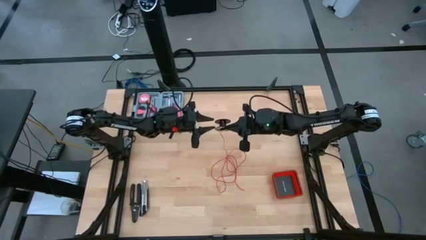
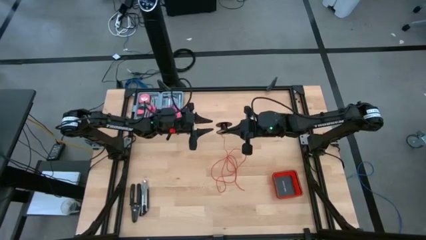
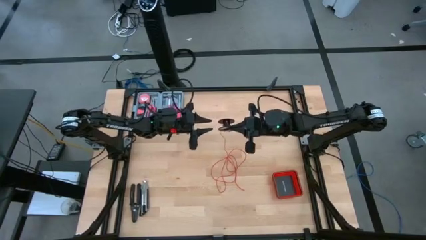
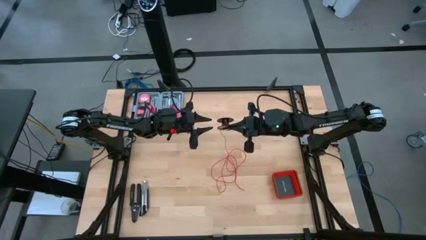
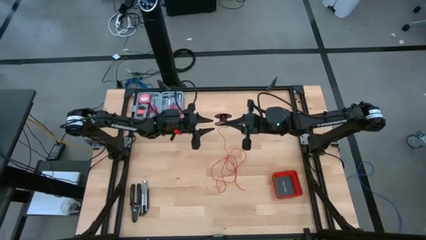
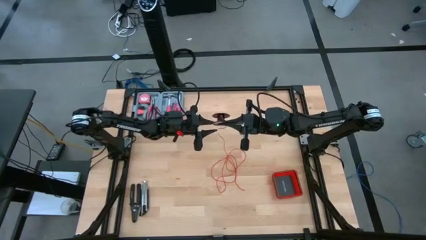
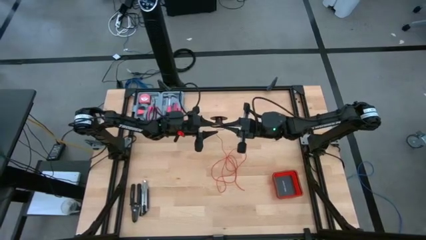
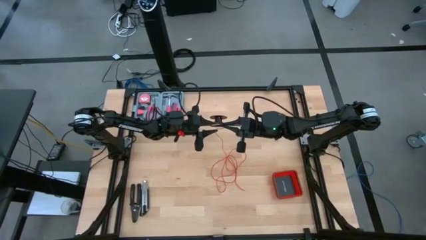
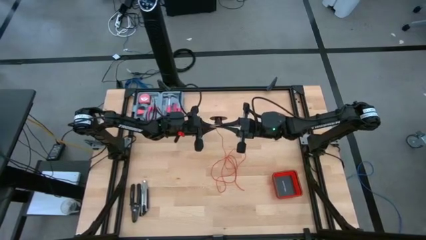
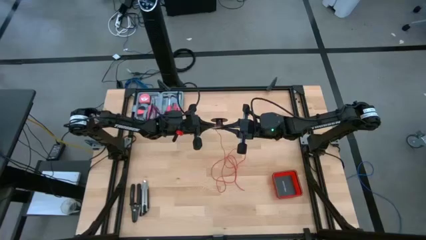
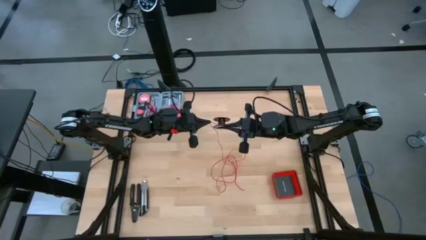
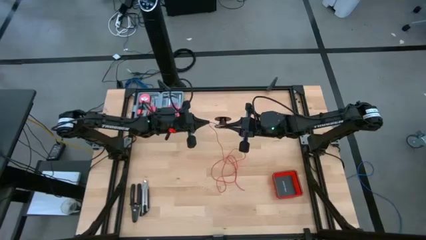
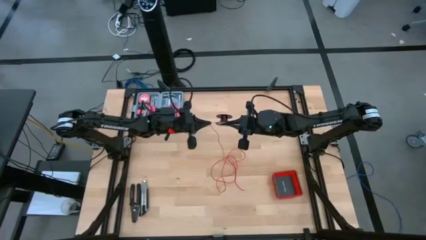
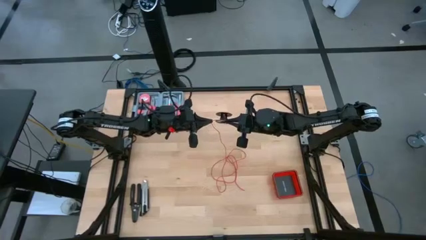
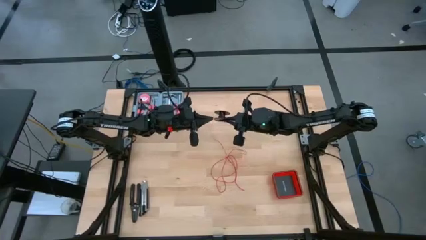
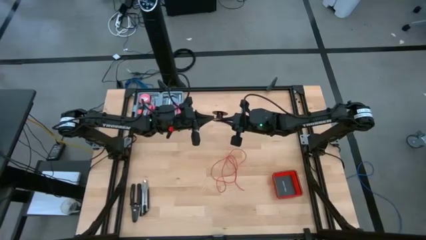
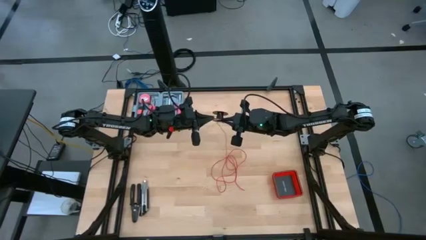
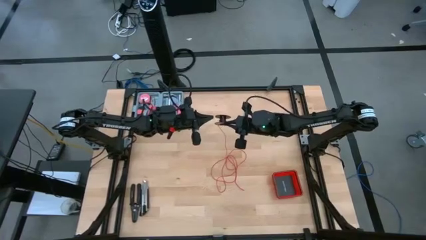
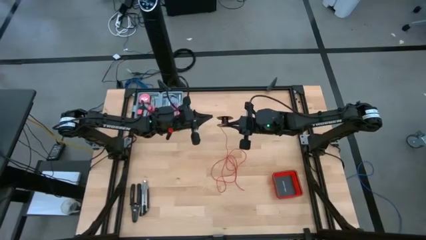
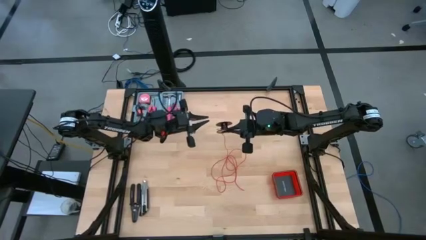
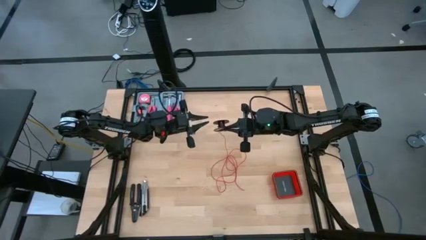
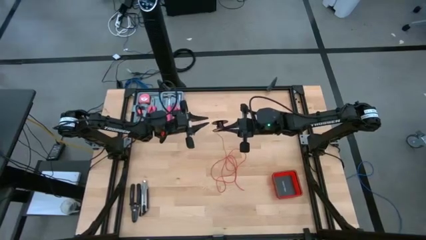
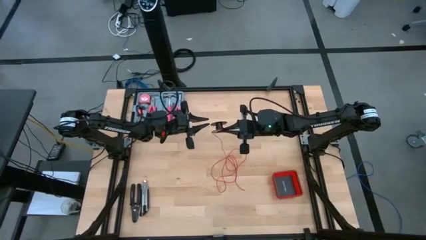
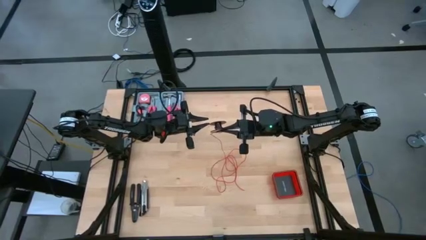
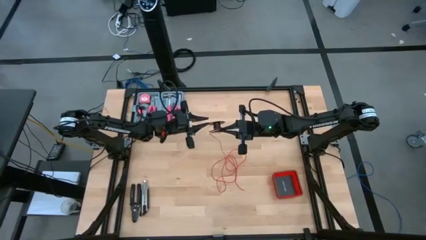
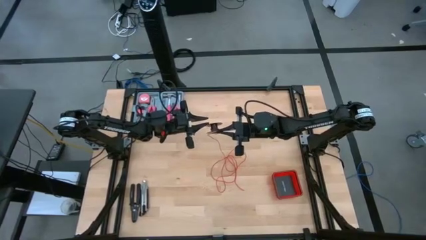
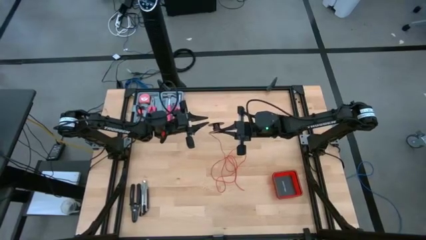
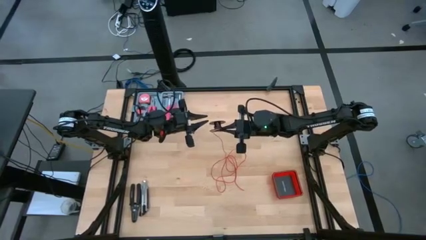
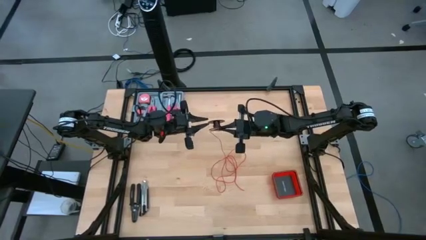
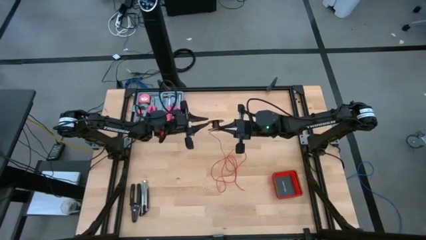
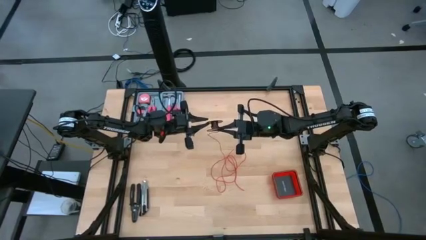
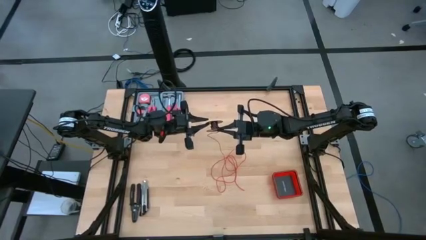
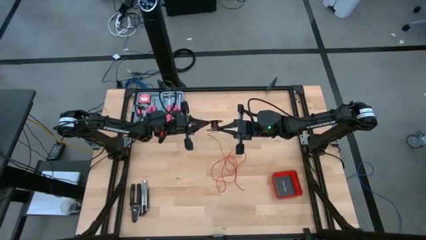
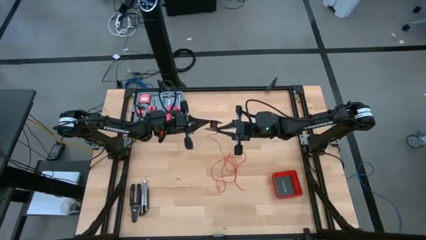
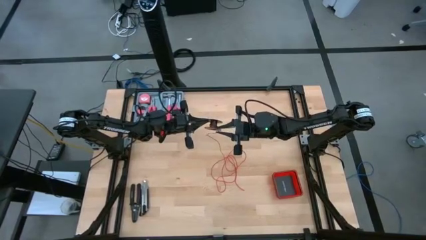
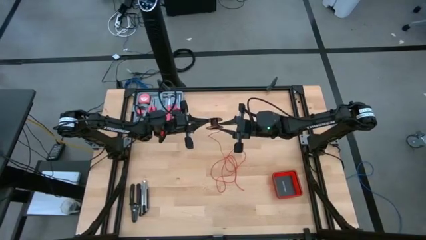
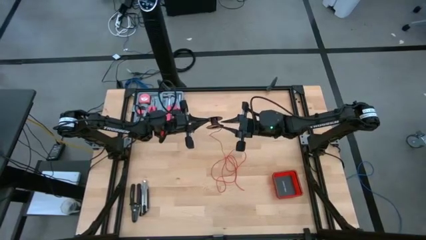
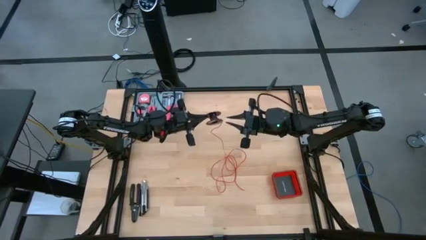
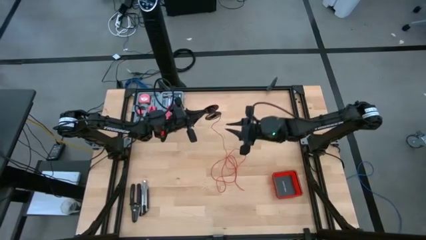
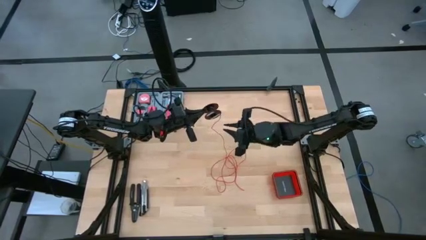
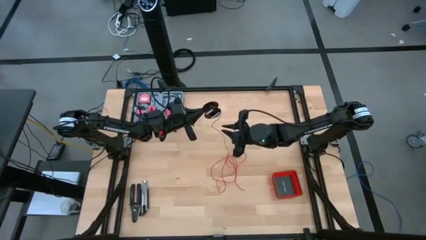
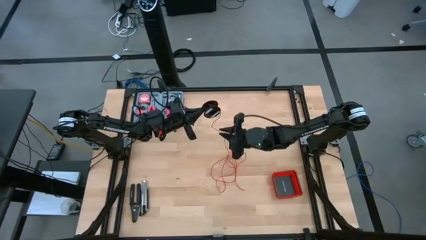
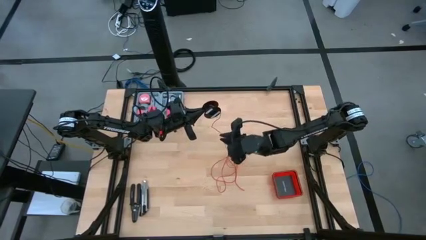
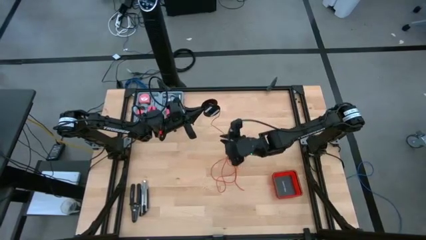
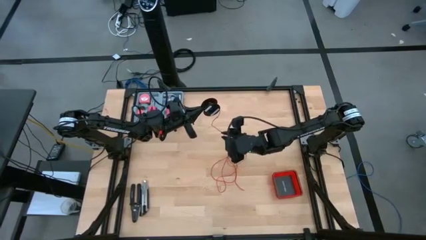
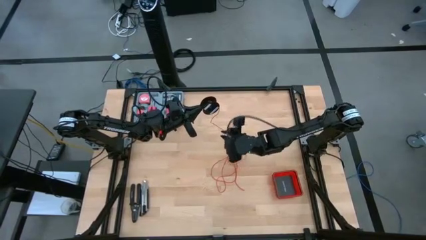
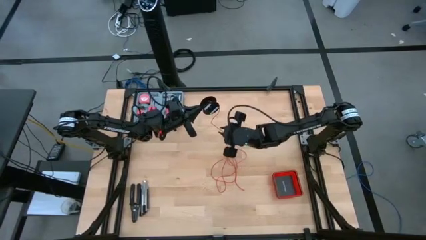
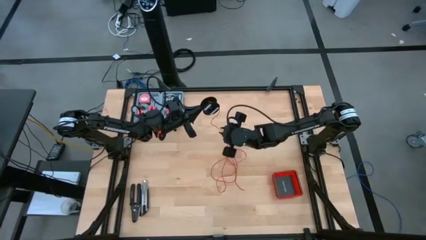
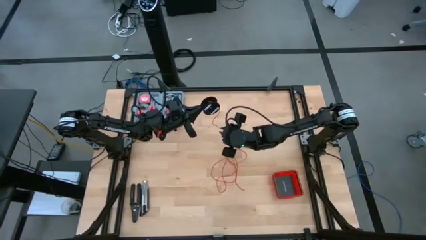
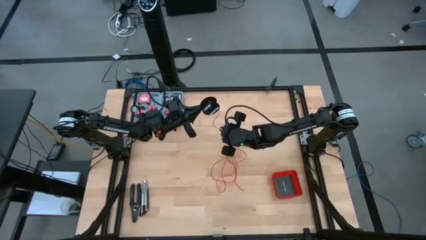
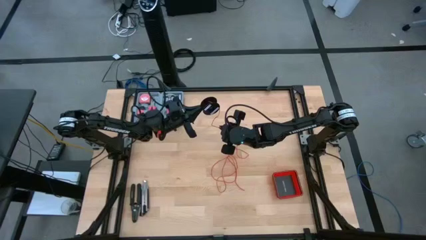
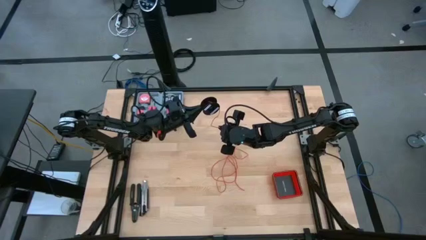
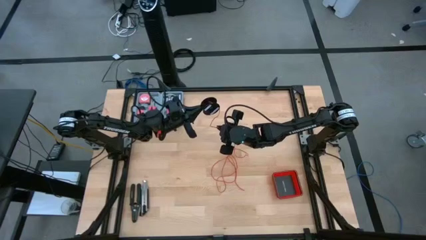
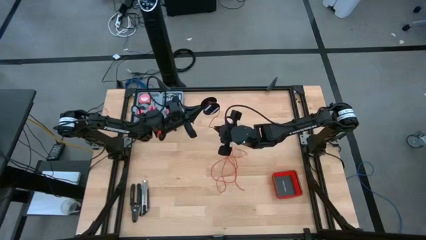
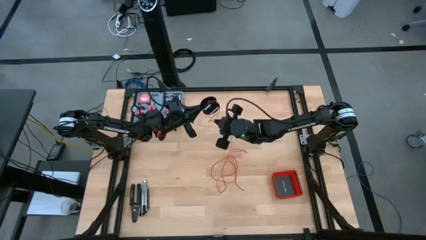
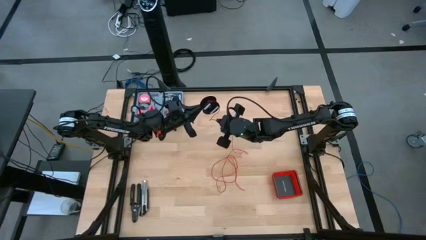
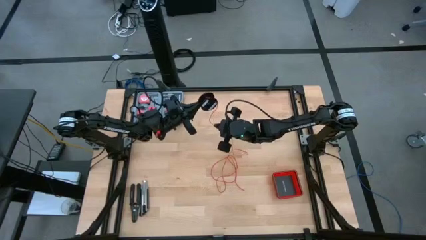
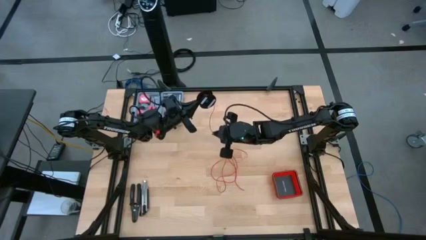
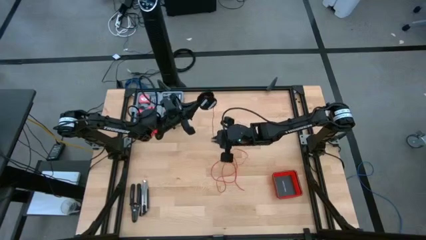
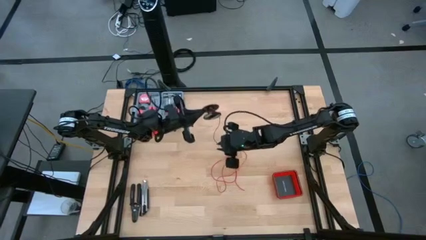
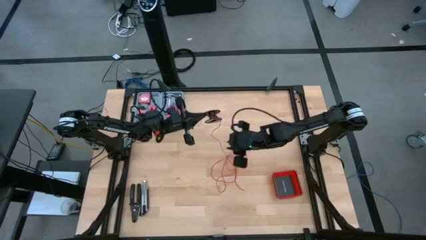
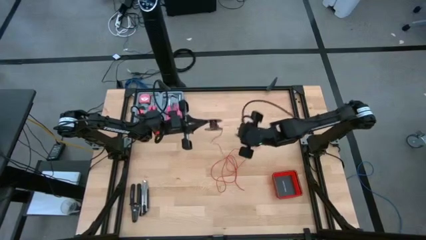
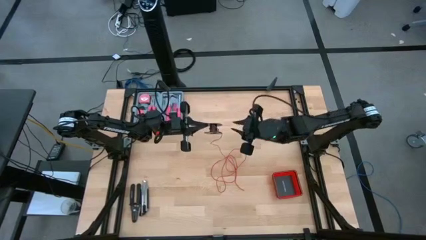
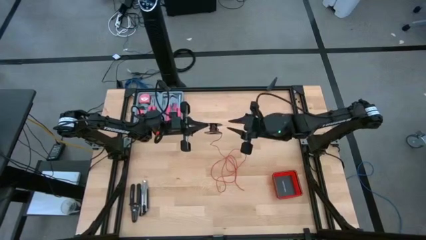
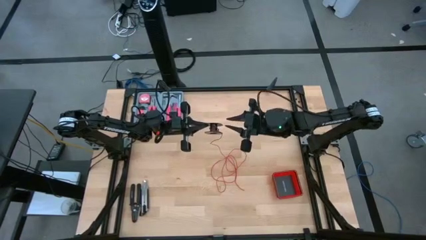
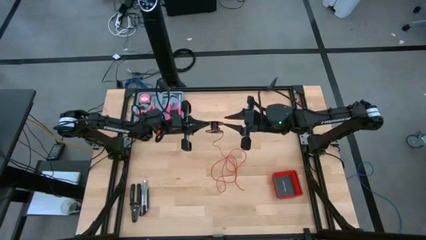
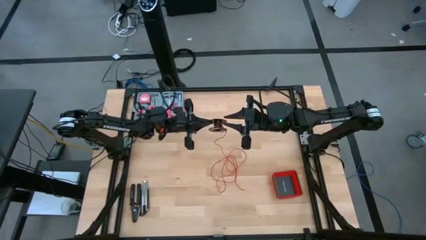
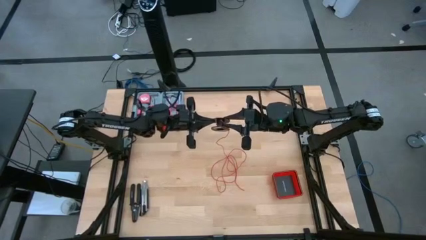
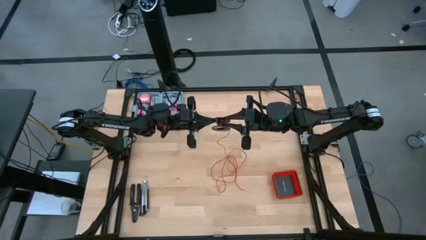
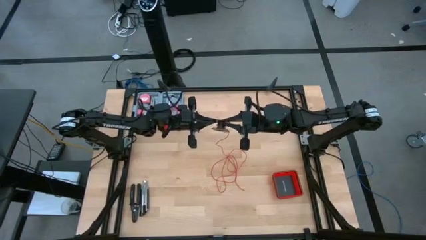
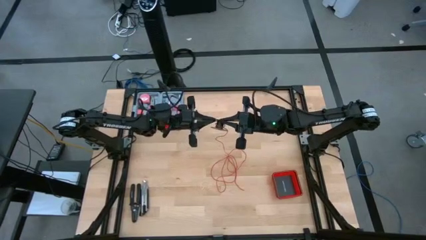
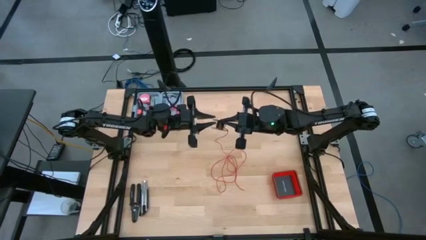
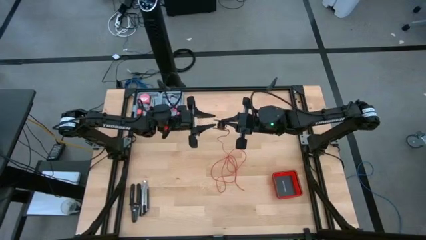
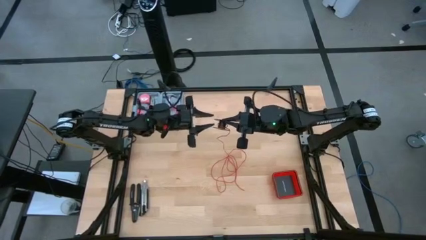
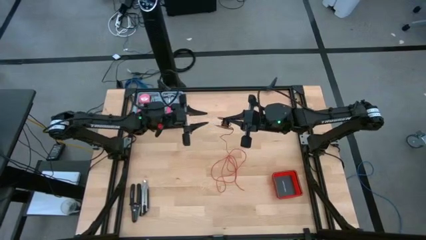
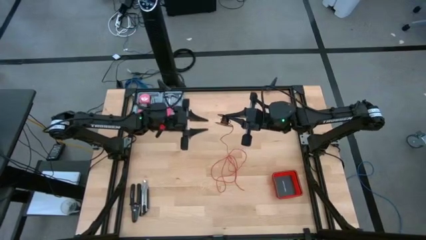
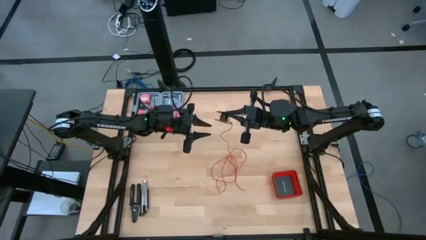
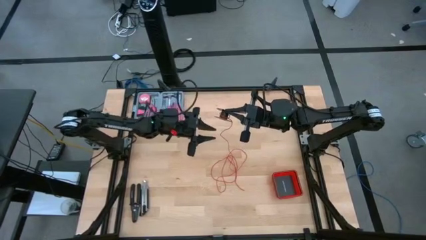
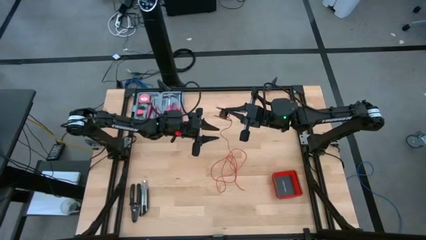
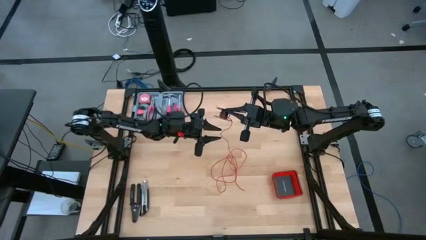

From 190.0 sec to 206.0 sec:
Task: Coil cords
Coil the red wire onto the spool
